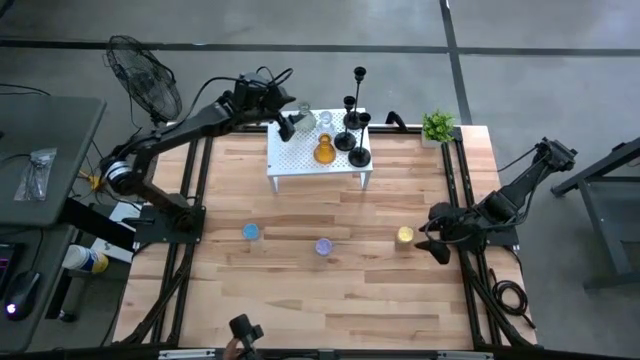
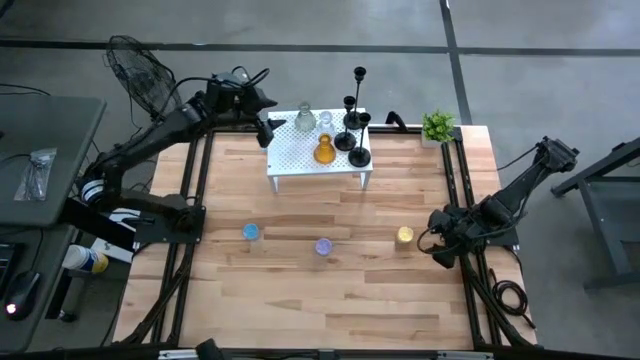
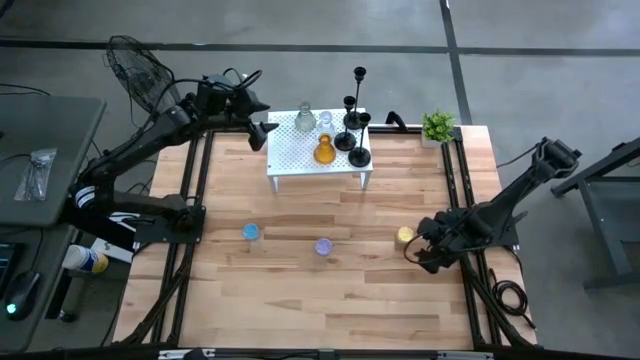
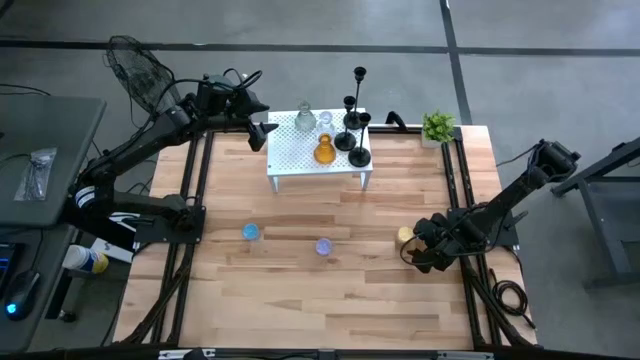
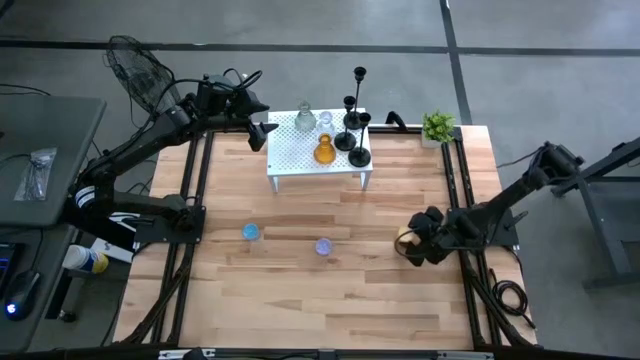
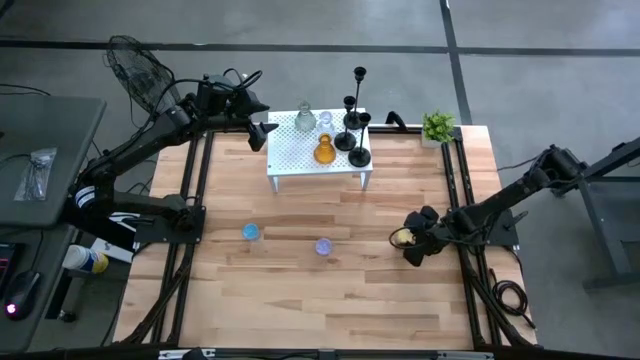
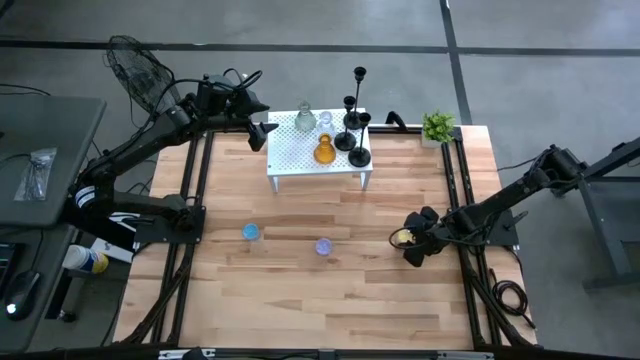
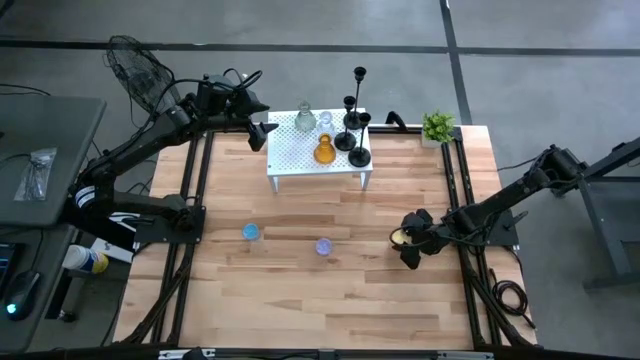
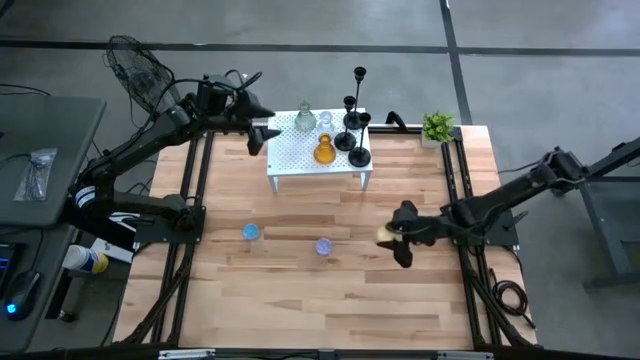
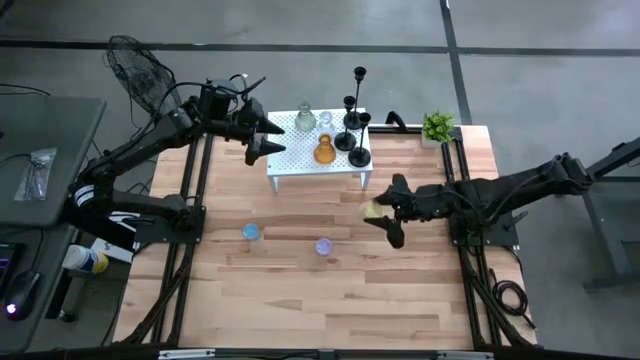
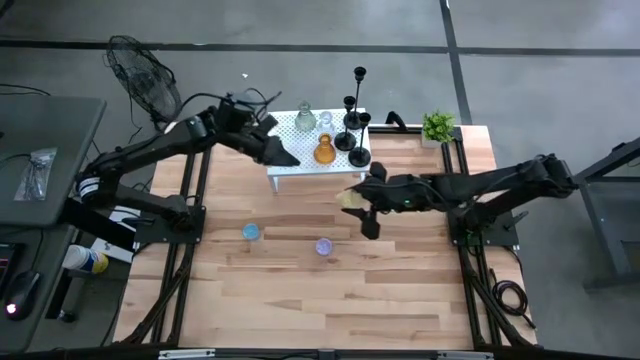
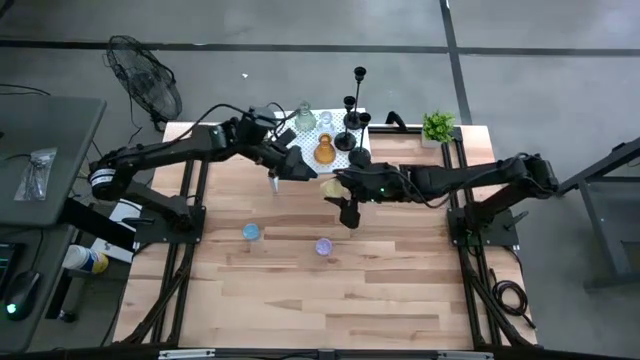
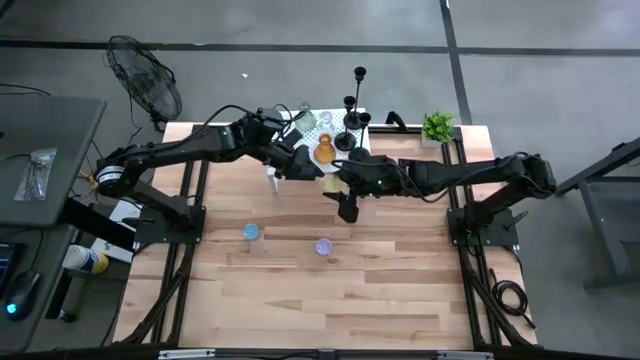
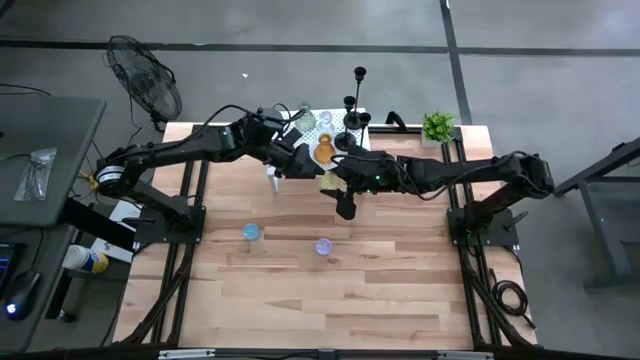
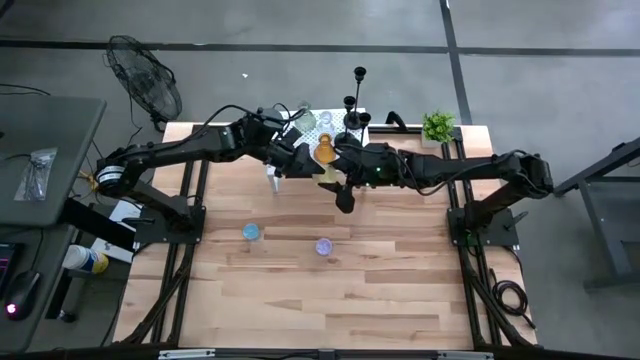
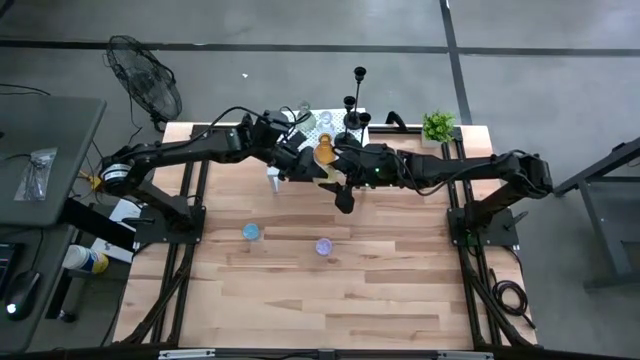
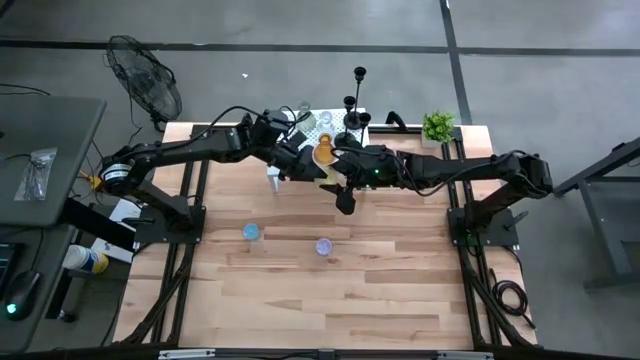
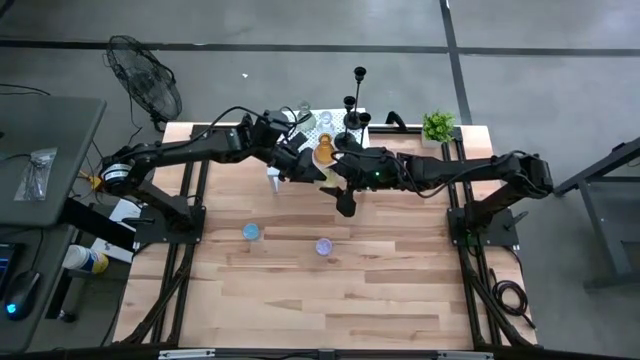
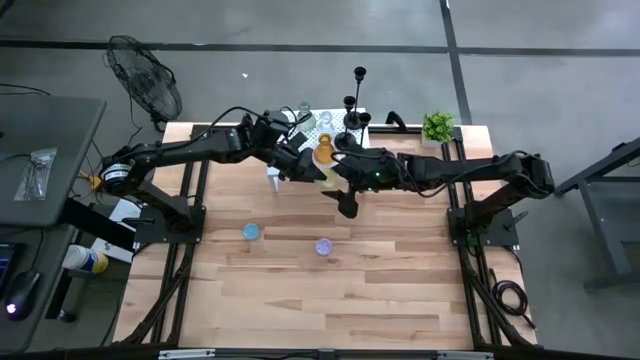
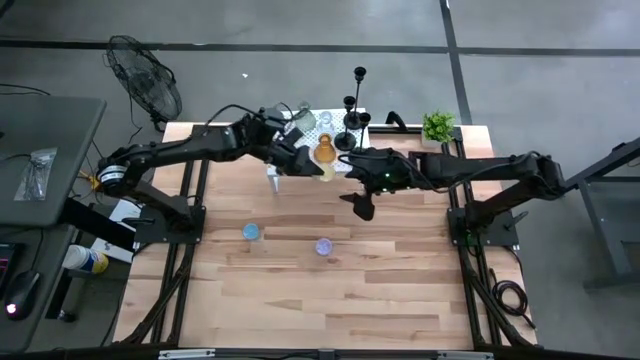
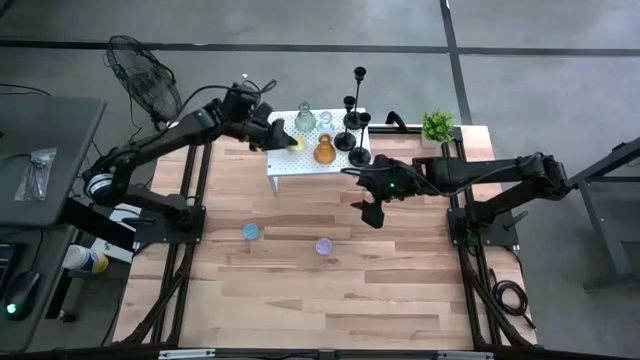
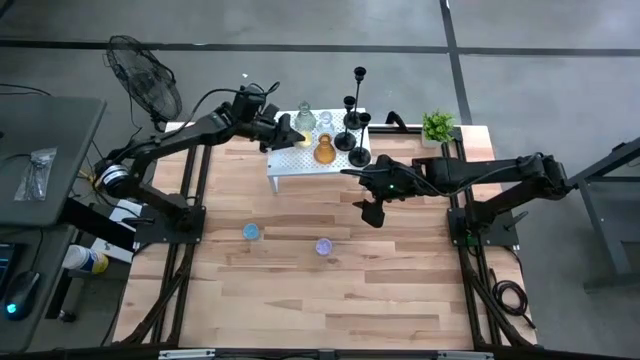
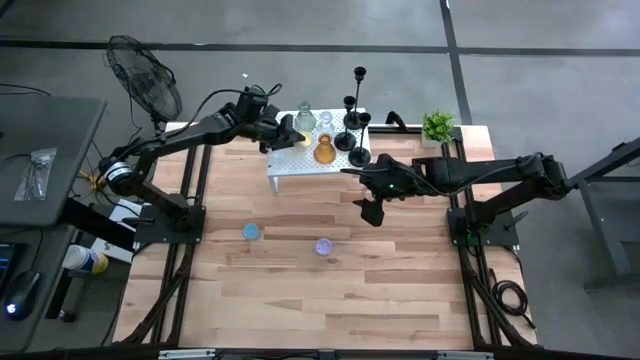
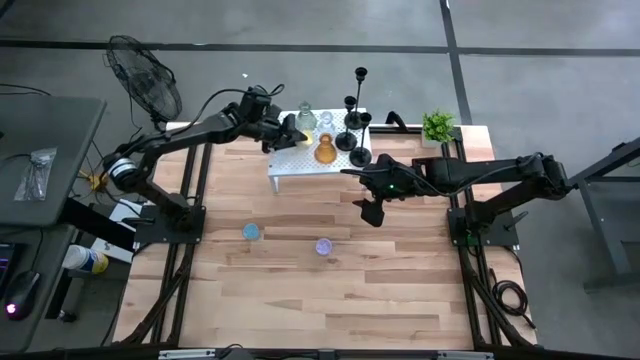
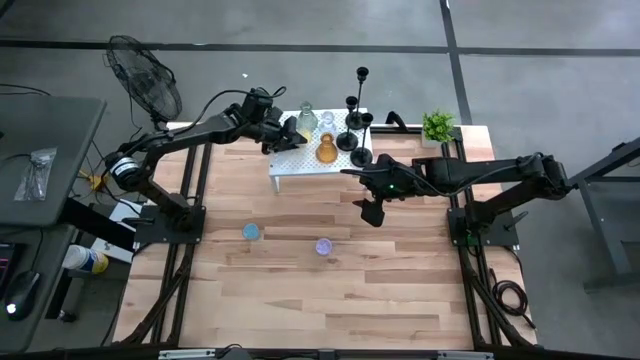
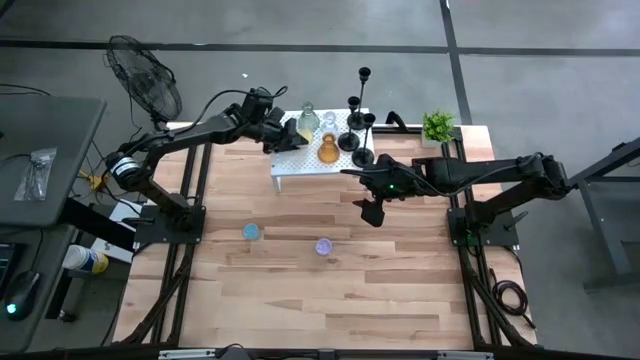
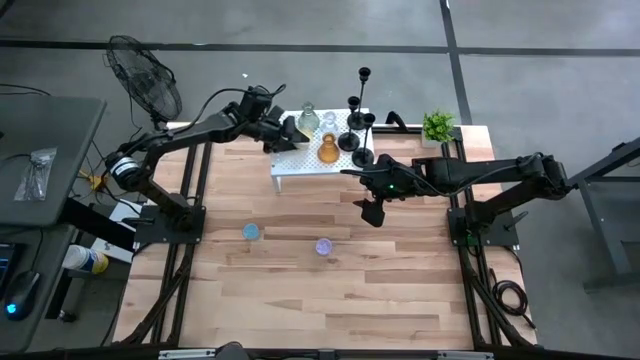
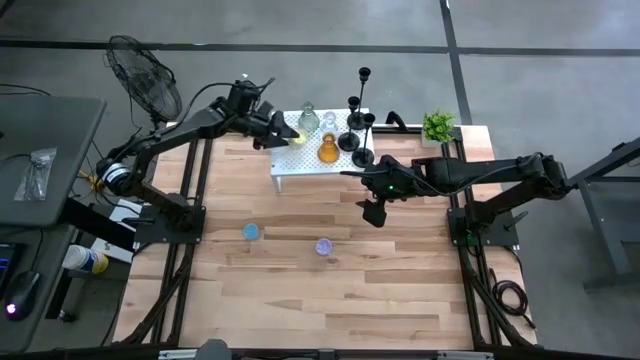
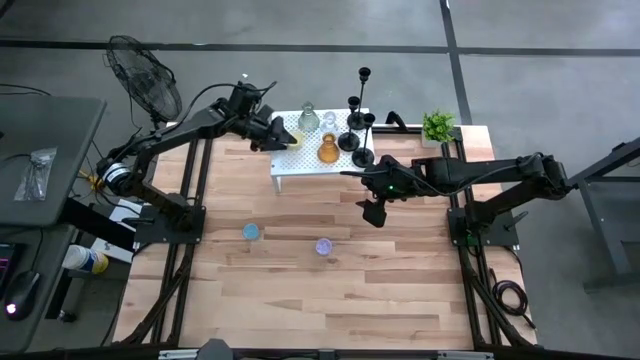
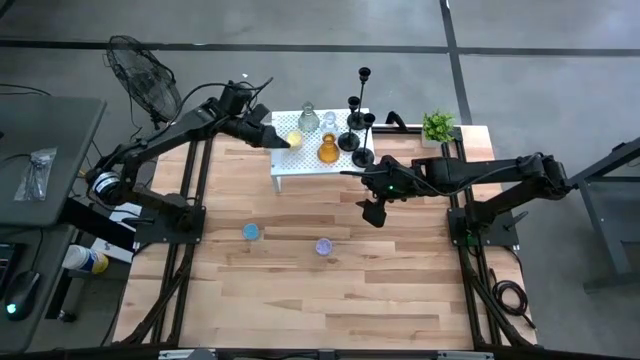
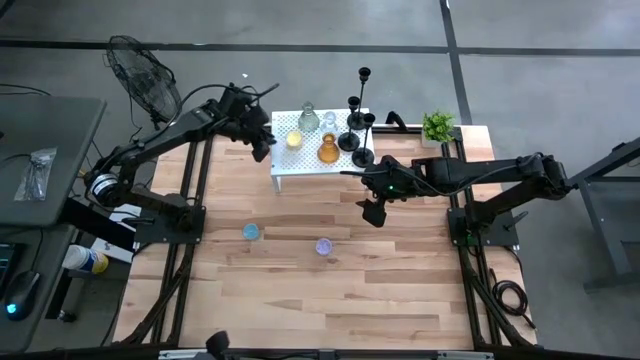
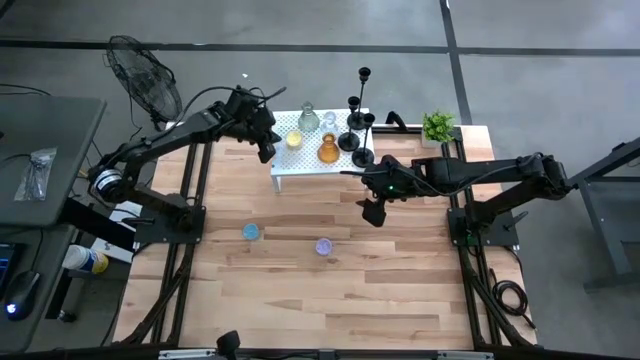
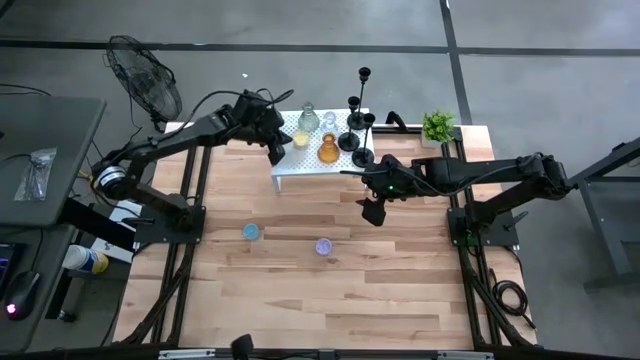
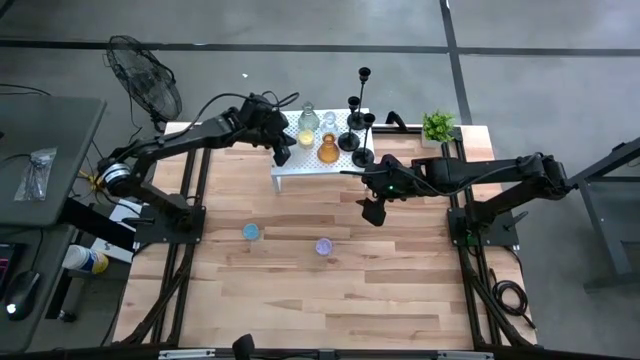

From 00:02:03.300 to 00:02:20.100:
Task: Pick & Place candle stick holders
Put the yellow scented candle on the shelf

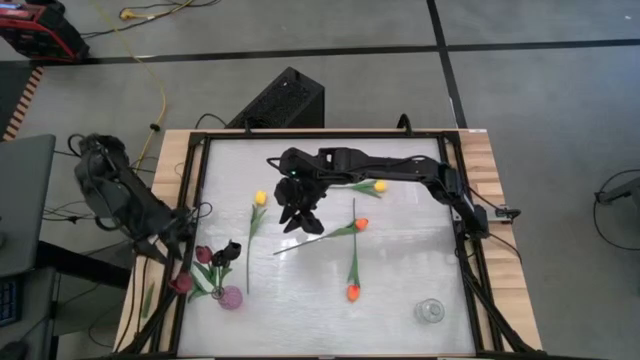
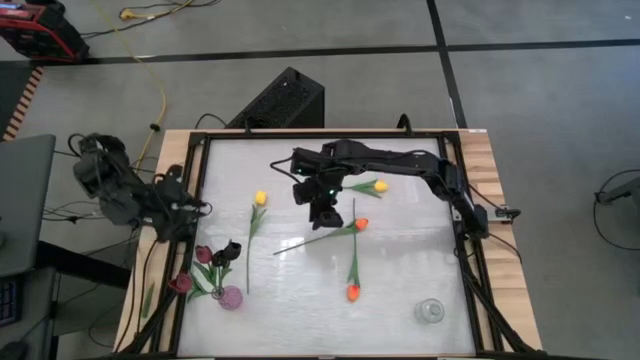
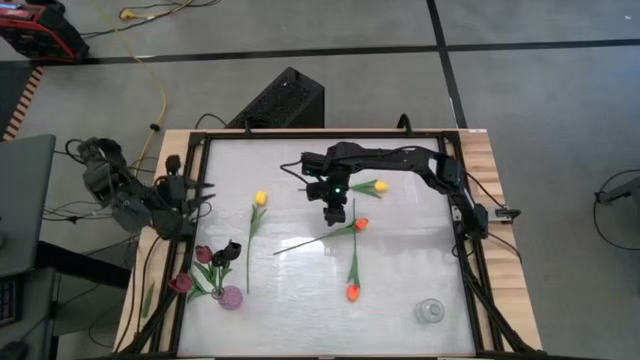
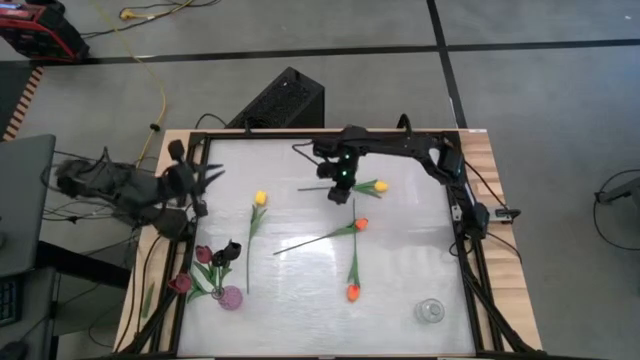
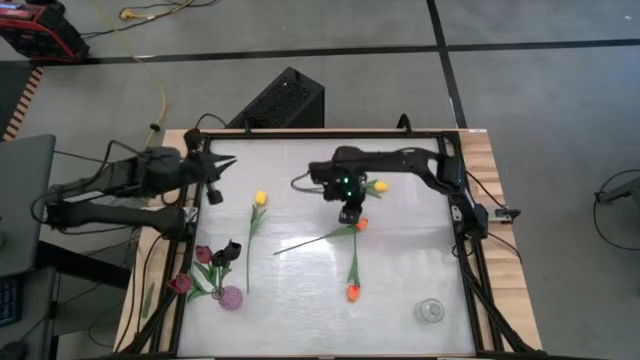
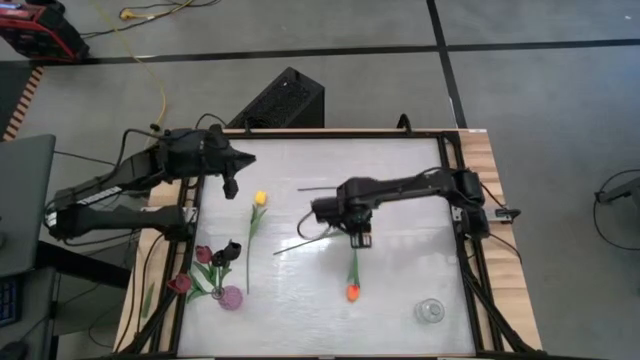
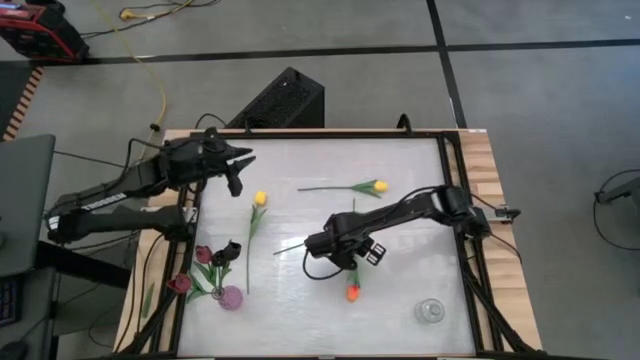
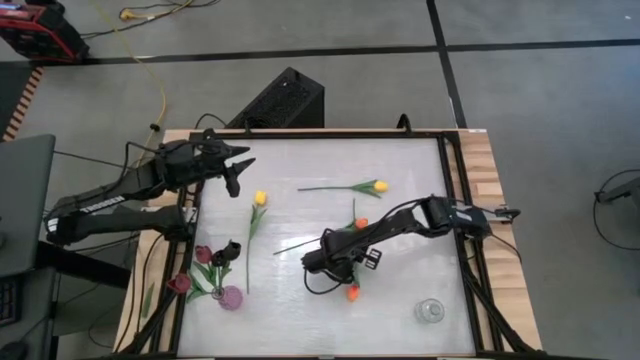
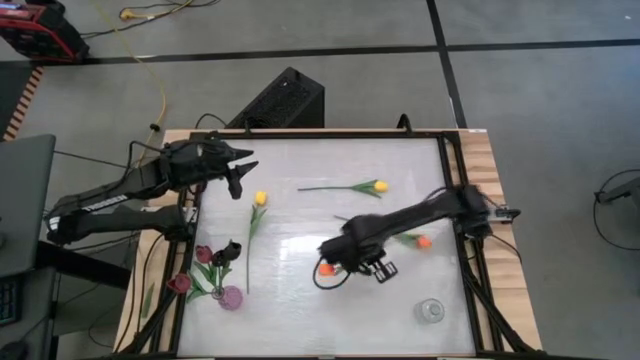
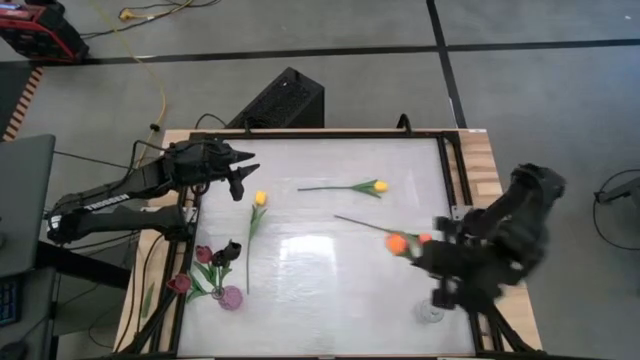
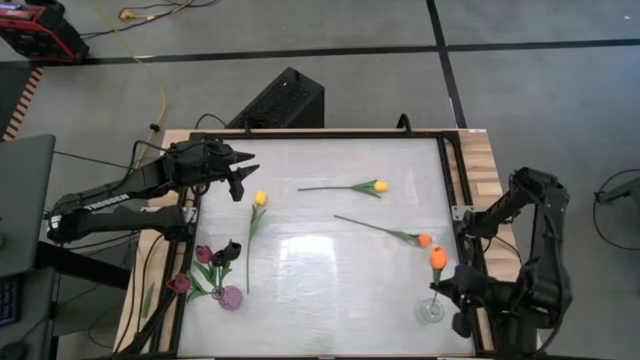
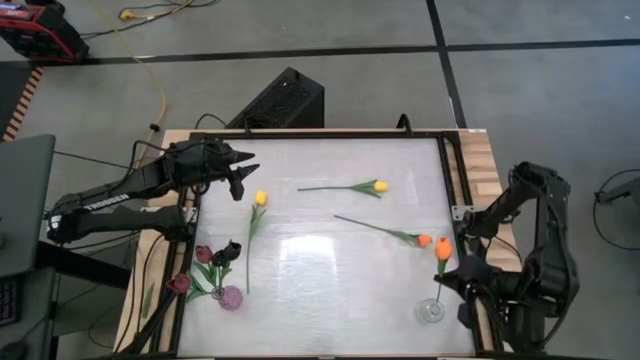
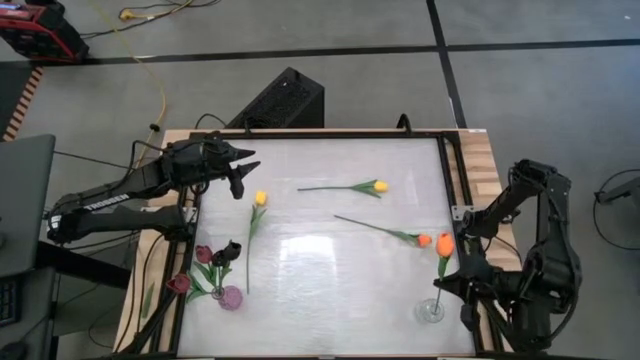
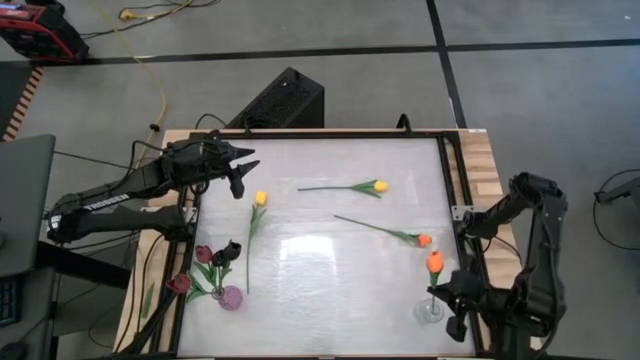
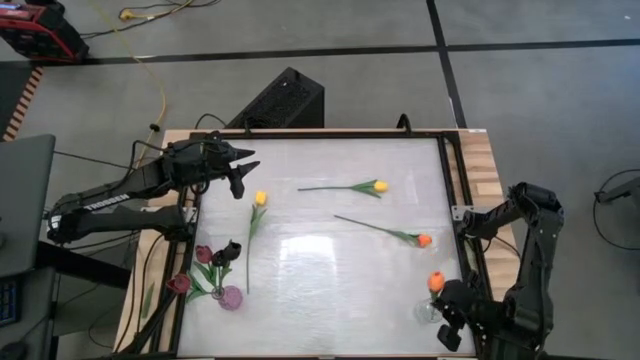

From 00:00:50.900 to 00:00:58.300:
Task: Sort flowers into vase by color
Put the bottom orange flower into the transparent flower vase
